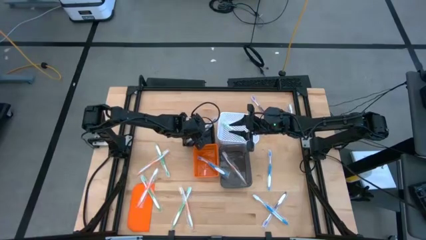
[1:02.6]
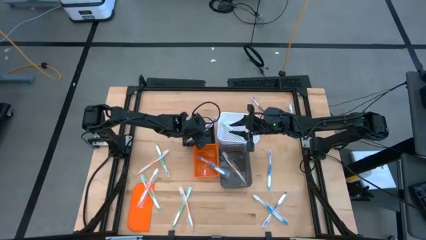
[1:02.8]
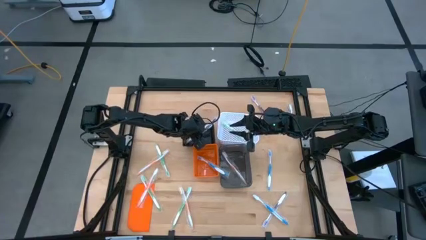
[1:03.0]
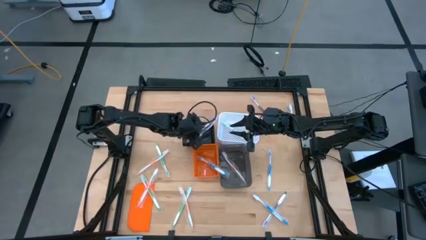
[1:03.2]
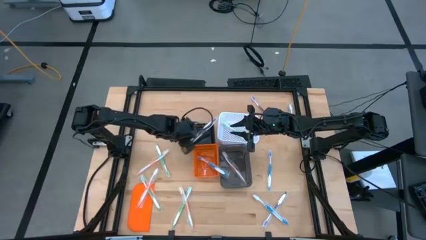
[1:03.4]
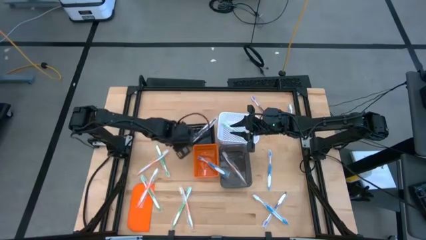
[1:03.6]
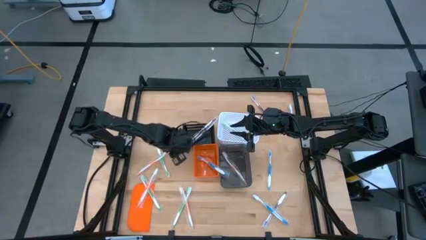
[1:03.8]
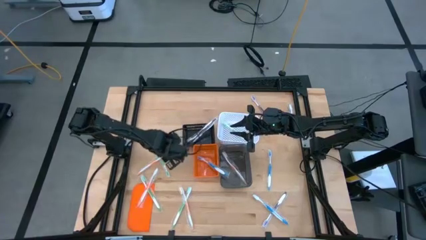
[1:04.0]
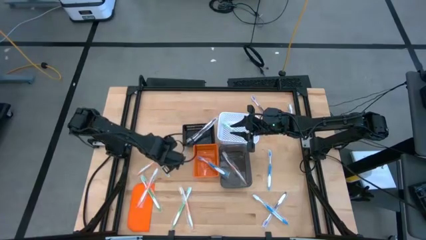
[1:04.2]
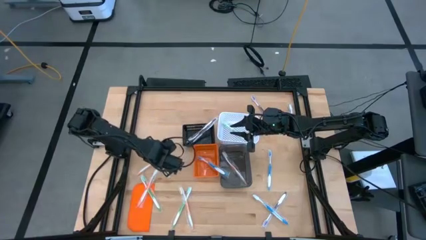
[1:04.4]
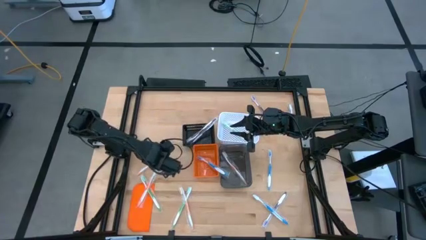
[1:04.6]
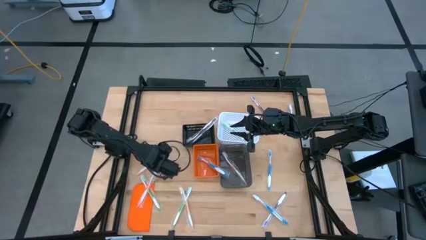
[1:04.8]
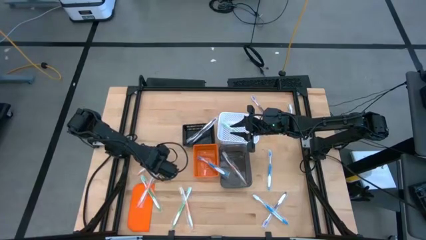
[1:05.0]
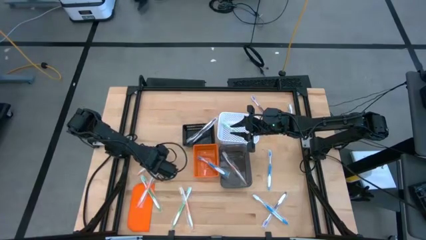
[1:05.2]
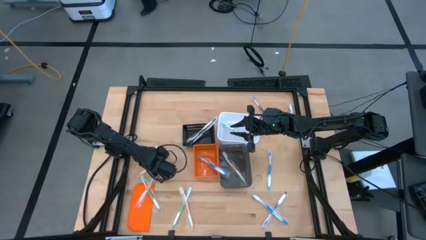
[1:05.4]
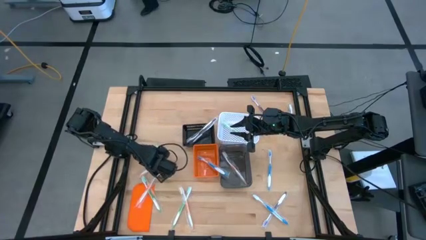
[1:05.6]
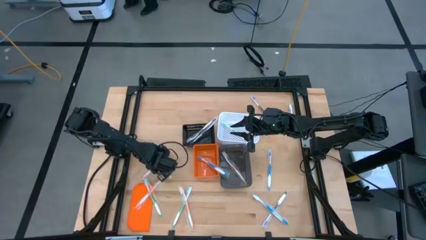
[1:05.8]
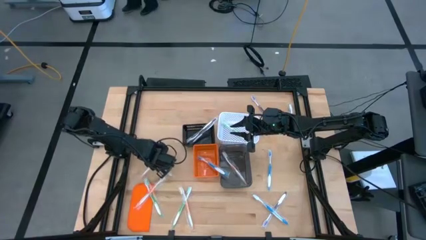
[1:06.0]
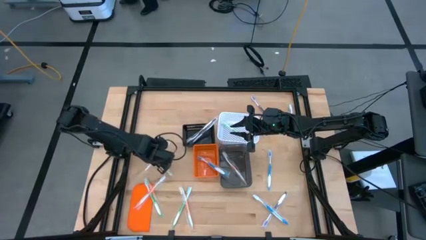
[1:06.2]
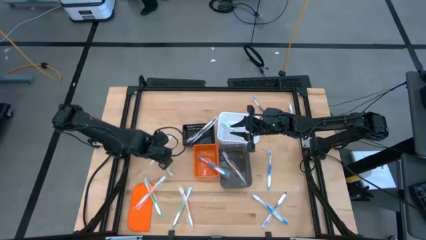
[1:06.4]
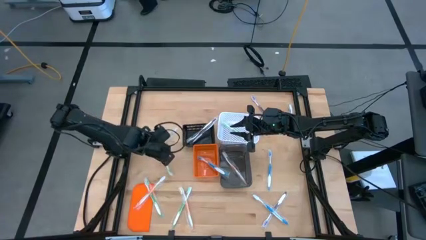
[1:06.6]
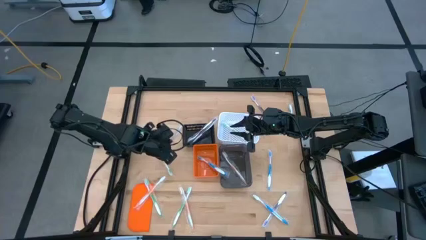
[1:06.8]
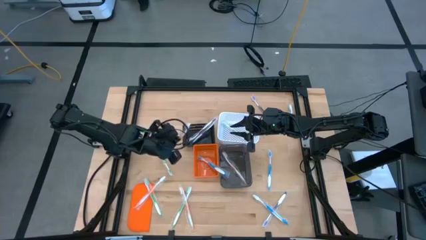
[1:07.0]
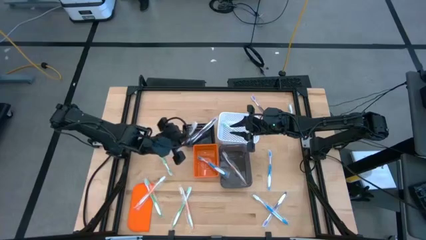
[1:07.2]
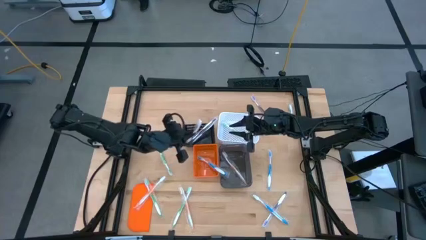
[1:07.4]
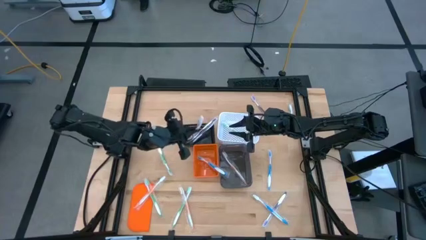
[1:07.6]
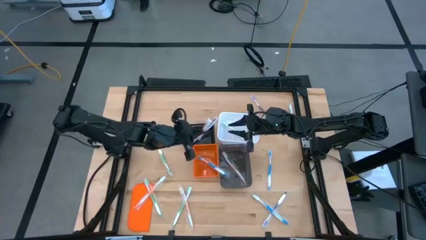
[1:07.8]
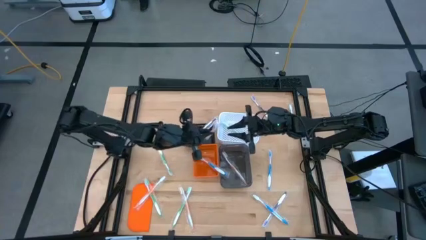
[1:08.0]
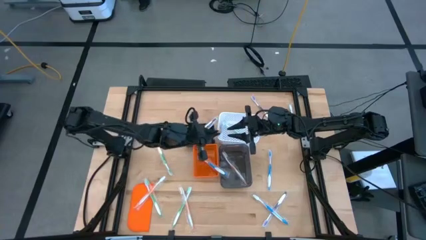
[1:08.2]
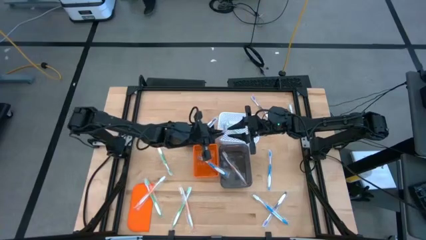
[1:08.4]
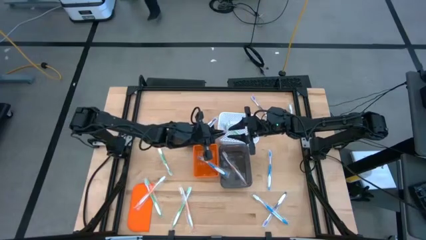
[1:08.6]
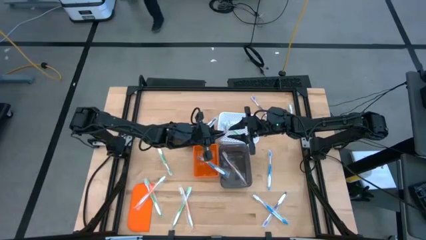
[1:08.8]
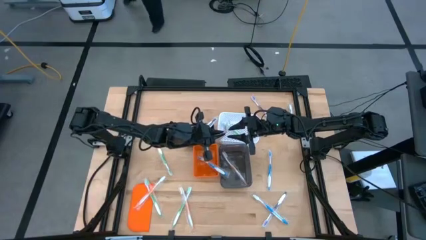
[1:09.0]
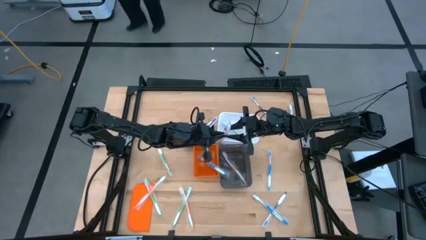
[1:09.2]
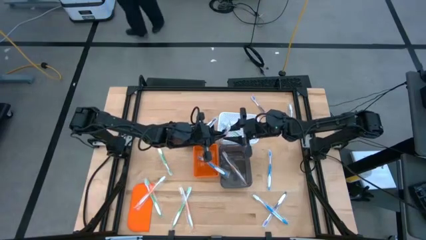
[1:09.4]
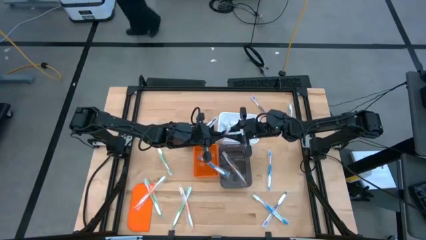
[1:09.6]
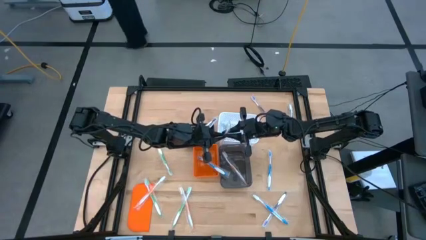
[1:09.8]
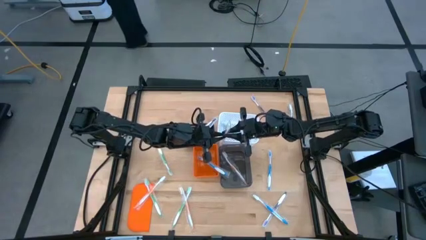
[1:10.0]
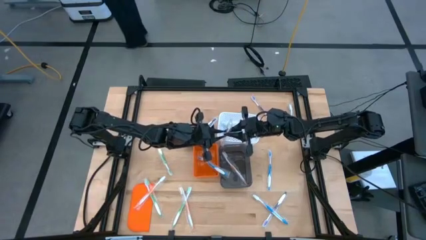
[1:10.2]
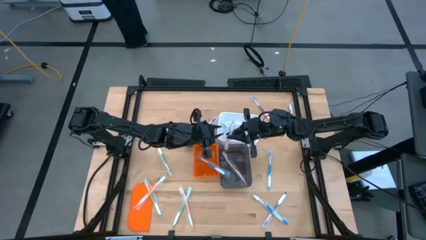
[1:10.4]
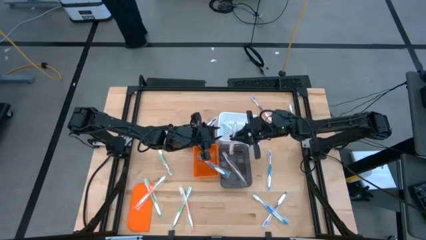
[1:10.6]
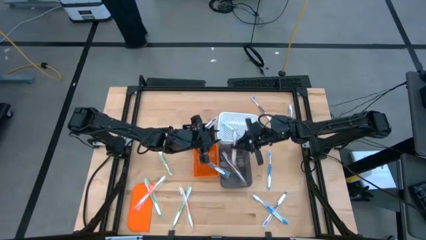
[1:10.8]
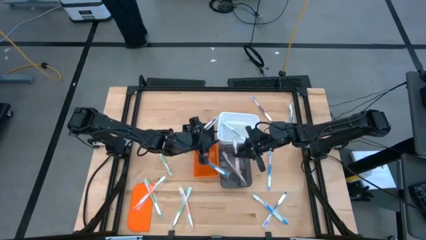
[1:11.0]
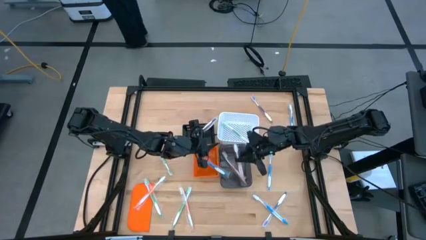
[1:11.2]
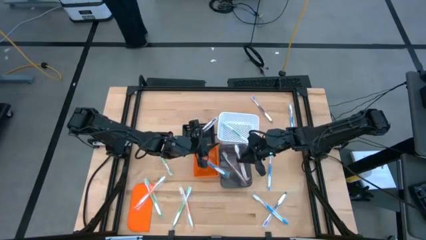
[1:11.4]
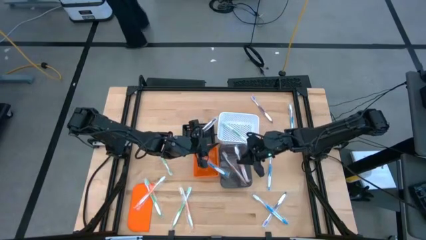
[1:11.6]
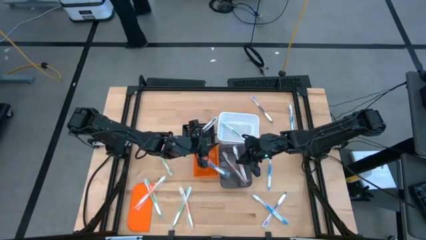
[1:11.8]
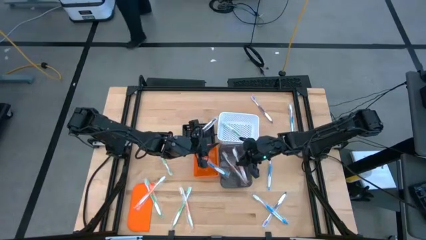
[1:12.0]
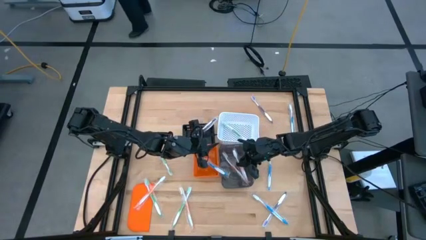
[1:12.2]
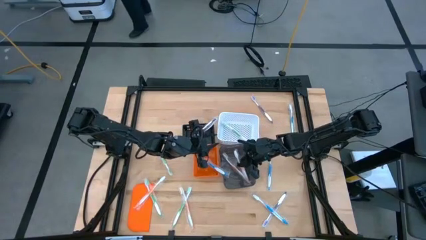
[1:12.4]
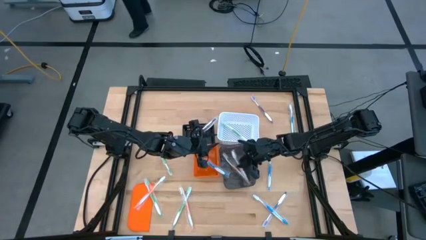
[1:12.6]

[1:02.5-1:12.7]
Task: Pick & Place Toothbrushes
Put the orange toothbrush into the gray bin

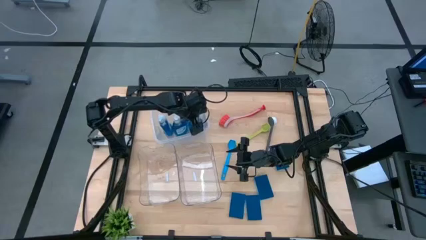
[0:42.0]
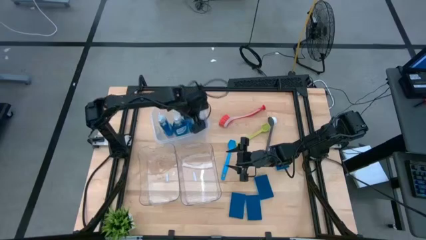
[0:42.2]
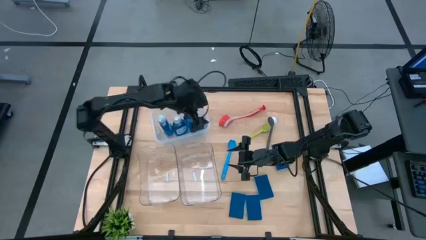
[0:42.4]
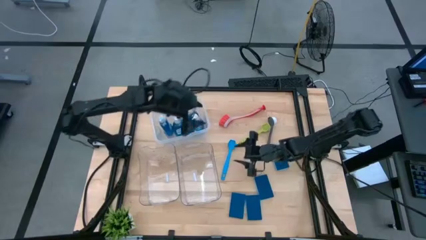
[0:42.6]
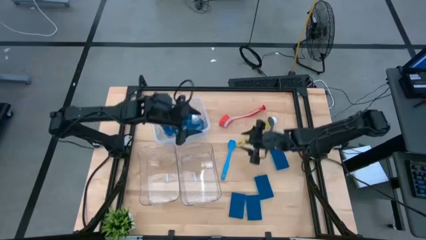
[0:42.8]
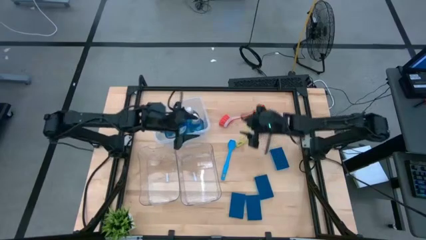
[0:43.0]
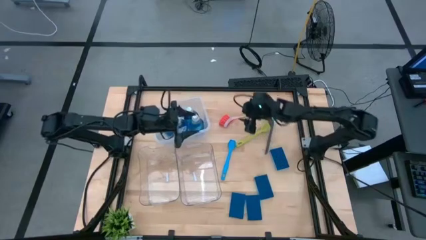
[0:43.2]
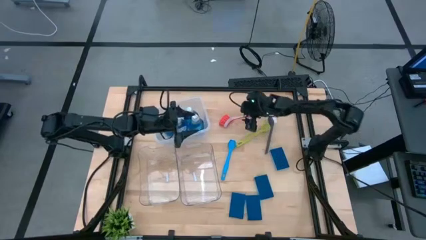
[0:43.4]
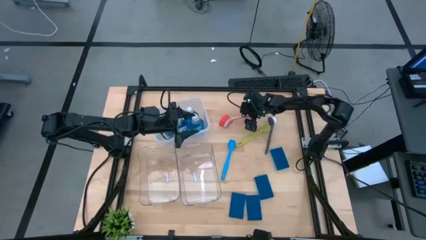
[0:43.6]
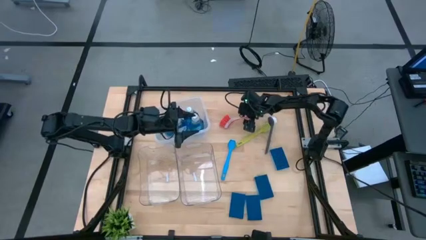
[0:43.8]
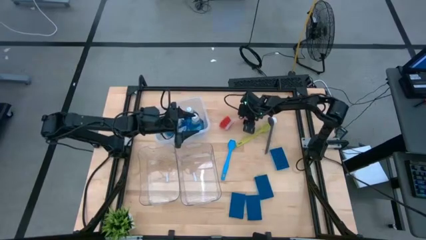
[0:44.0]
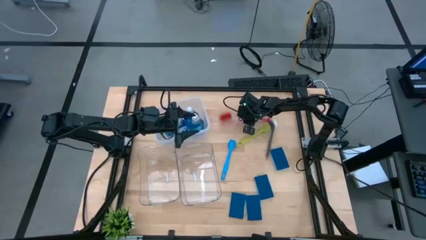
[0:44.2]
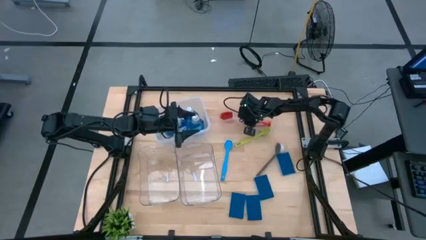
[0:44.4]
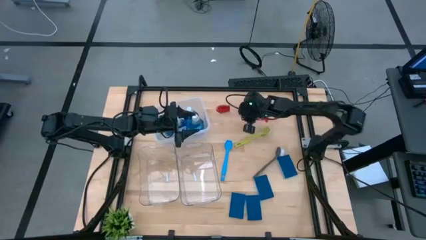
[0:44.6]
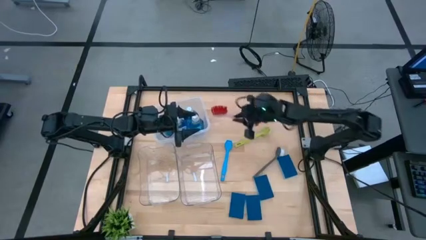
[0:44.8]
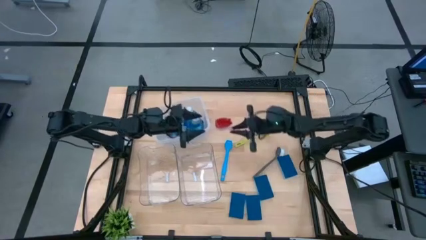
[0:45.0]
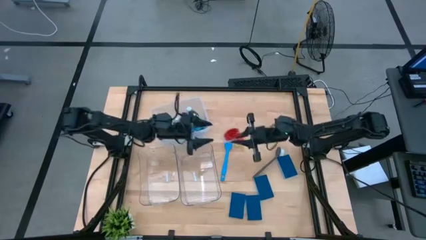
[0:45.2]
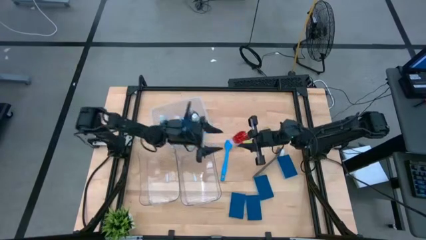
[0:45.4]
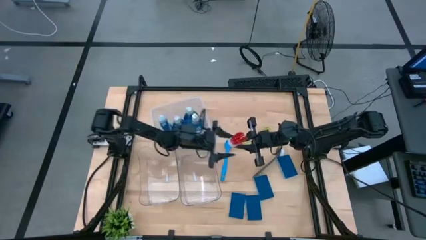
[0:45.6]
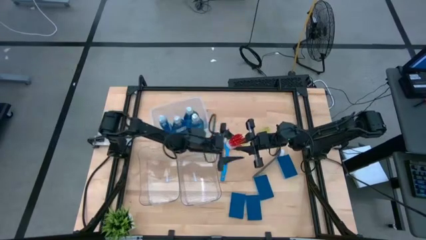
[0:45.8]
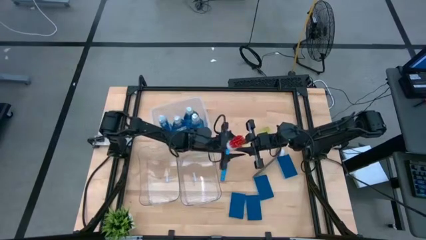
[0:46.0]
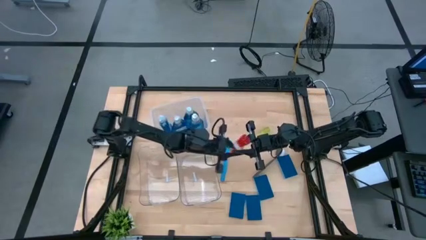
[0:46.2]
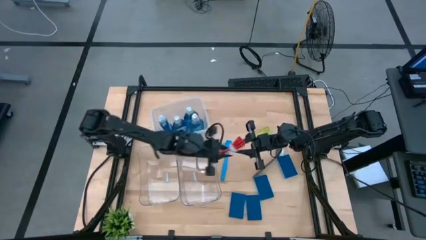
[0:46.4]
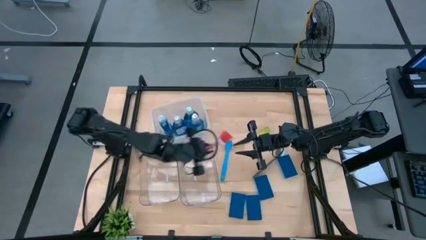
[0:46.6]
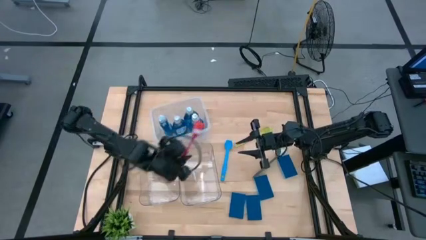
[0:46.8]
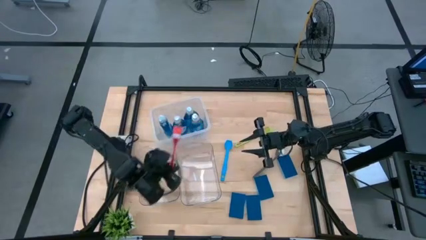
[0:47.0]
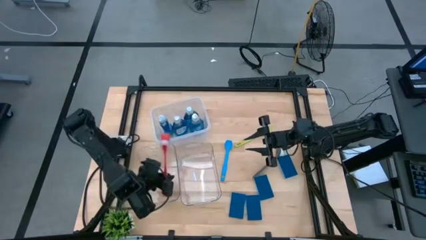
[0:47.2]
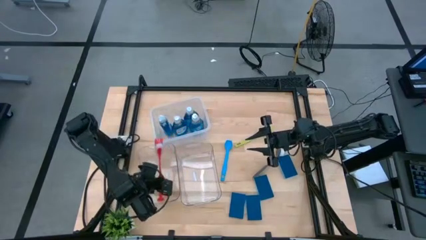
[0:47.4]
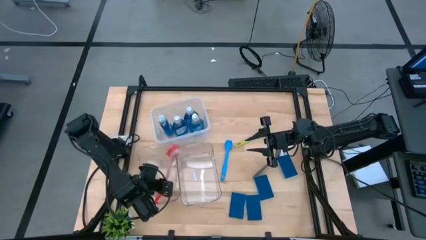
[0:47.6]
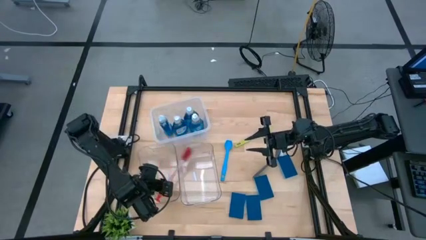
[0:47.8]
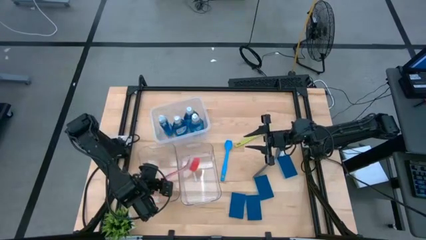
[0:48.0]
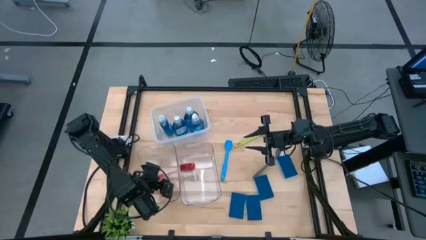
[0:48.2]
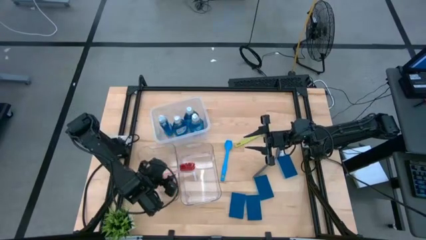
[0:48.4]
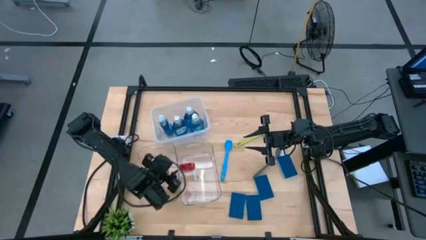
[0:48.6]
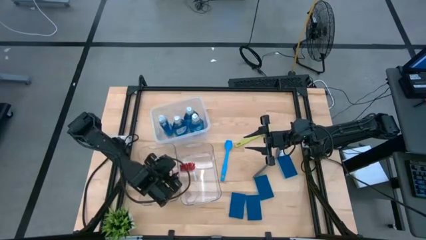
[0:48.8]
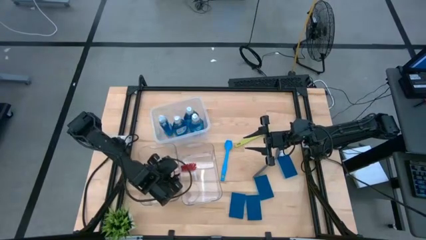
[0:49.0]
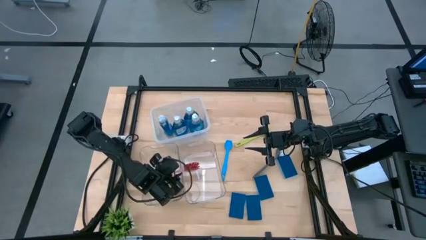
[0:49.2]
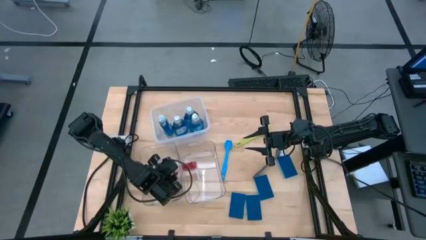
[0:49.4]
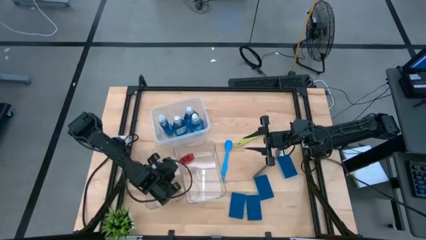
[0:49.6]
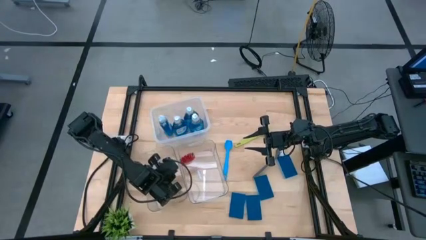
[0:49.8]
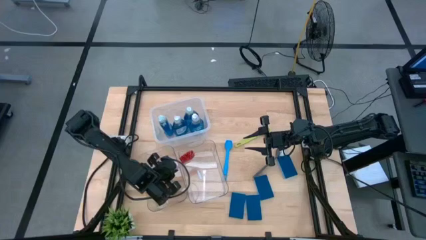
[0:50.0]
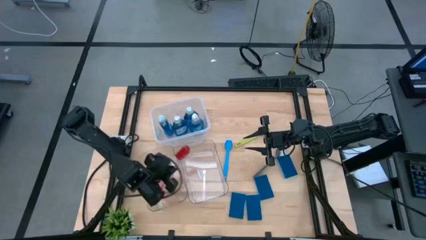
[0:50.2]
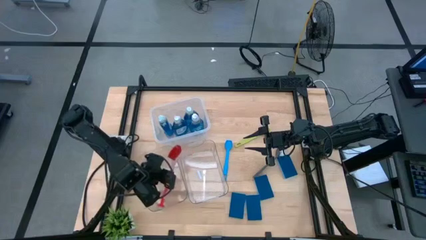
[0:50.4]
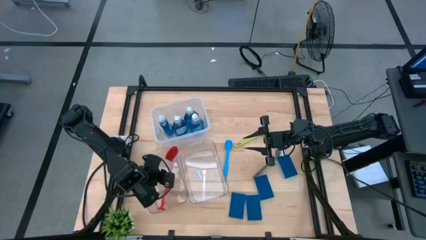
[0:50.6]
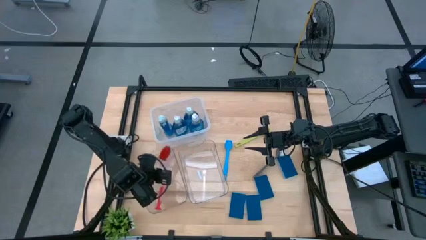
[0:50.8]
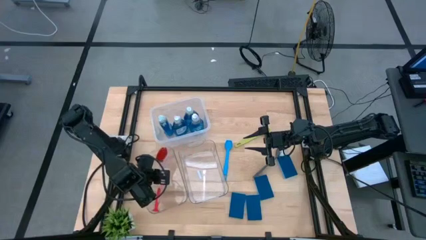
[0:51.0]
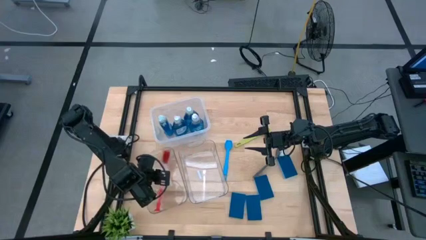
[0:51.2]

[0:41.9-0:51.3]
Task: Pick & Place Kitchen Sink Supplies
Put the red dishwashing brush into the left transparent bin
